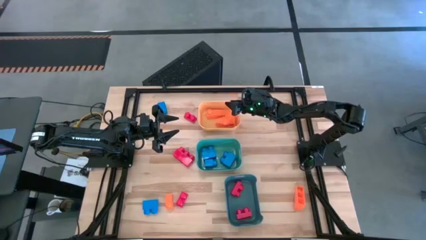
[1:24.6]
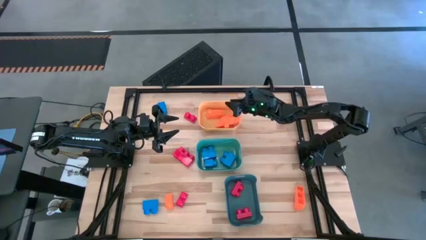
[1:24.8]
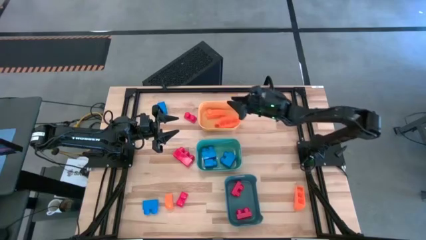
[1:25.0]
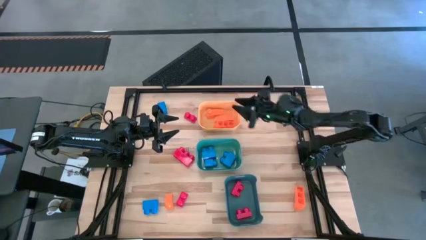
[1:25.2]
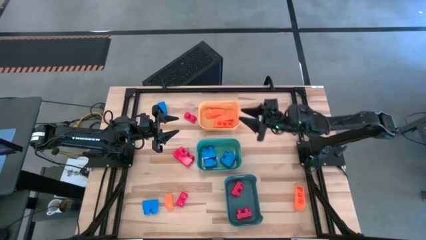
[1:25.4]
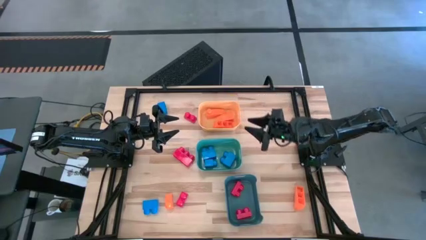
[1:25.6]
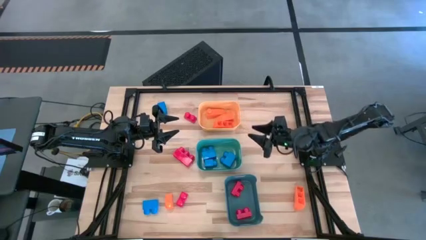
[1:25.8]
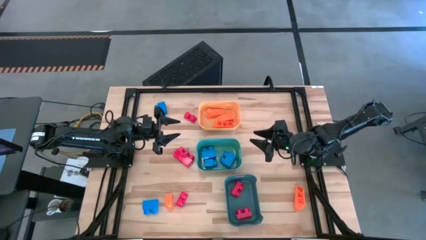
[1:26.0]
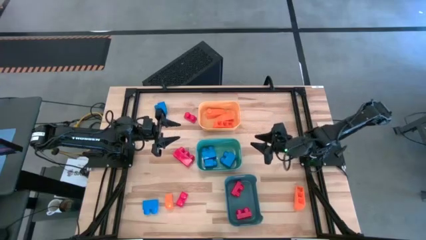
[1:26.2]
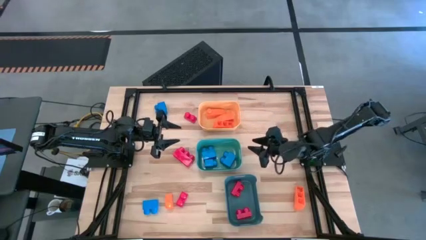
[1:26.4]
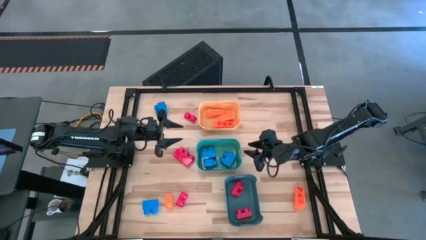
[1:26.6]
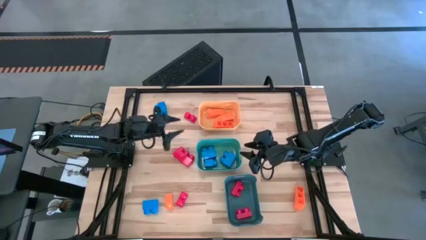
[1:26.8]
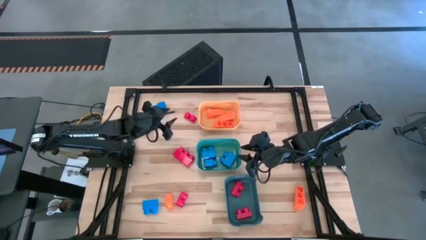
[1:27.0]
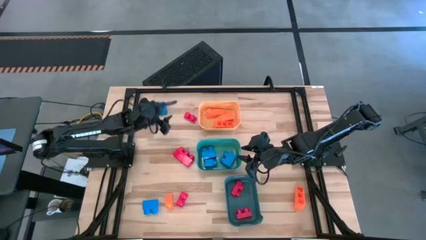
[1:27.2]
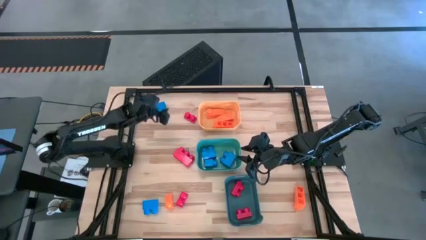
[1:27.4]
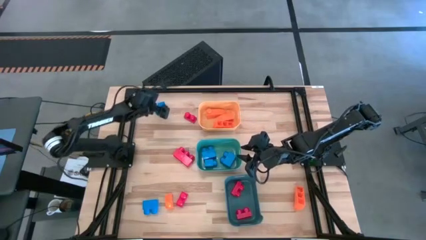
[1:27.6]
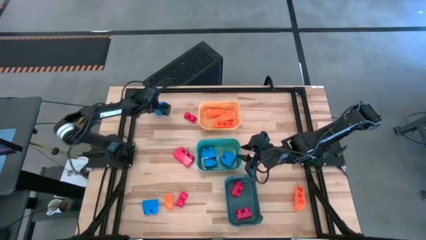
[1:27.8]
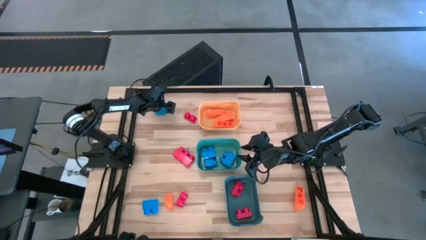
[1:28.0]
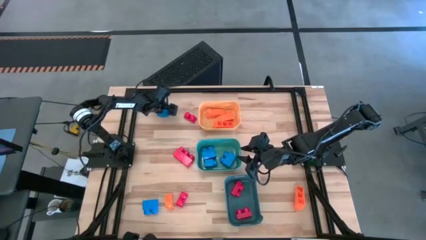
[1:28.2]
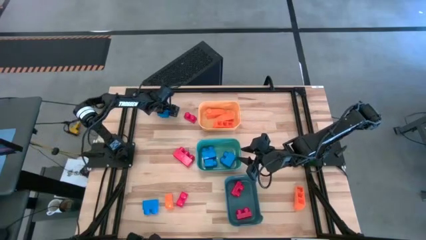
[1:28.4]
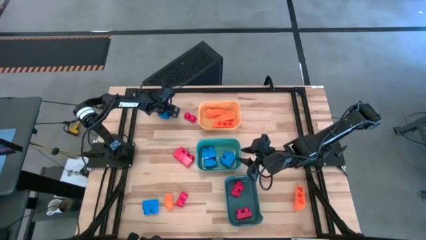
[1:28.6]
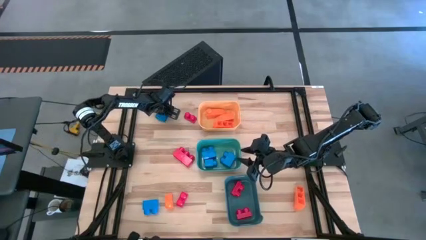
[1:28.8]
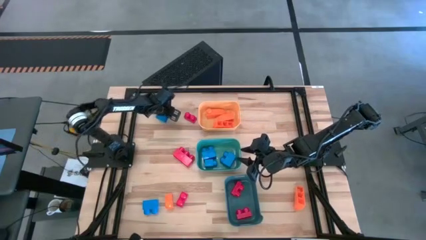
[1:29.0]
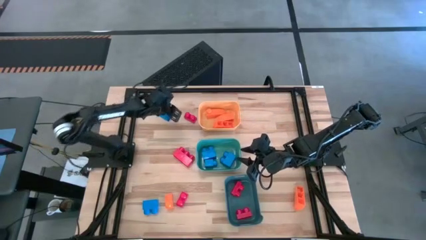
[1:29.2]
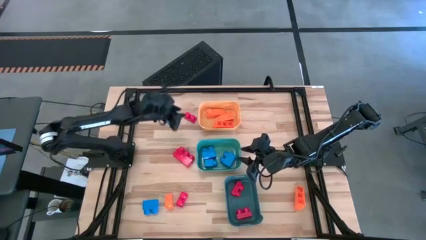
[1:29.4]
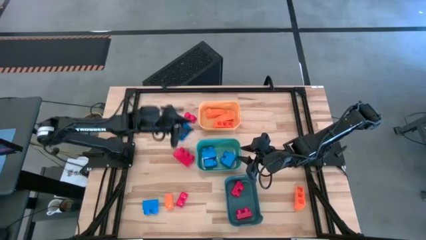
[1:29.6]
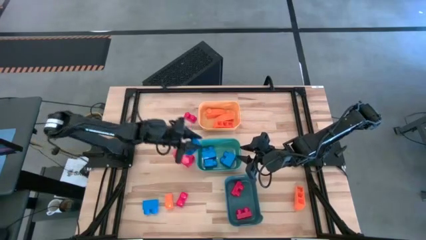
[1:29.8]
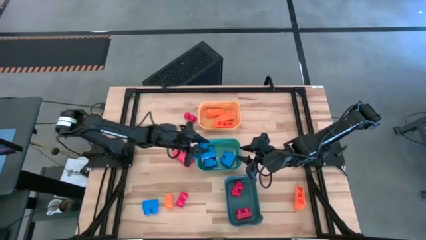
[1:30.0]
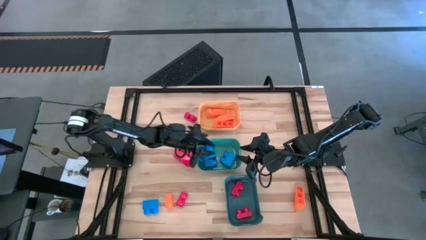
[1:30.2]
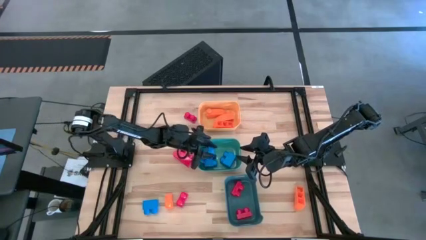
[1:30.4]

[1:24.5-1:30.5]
Task: Sort & place blocks by color
Put the blue game piece into the green bin

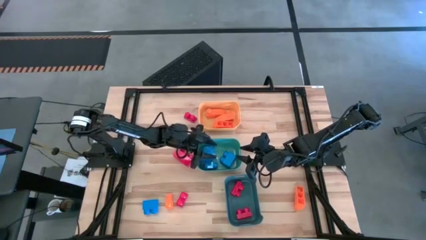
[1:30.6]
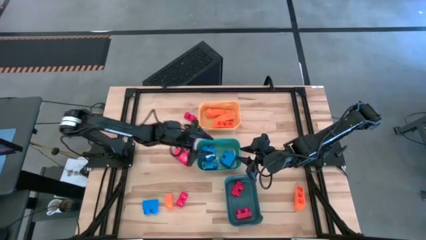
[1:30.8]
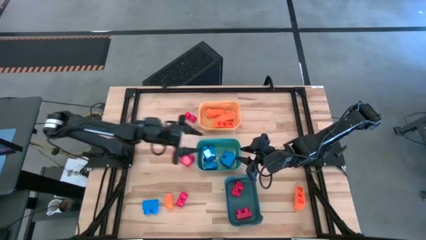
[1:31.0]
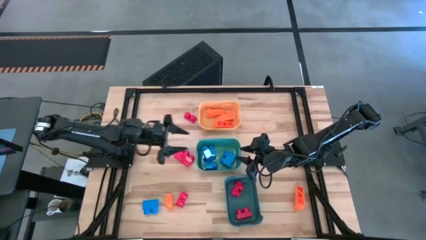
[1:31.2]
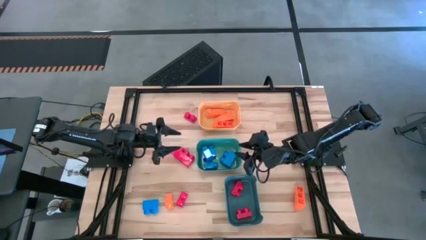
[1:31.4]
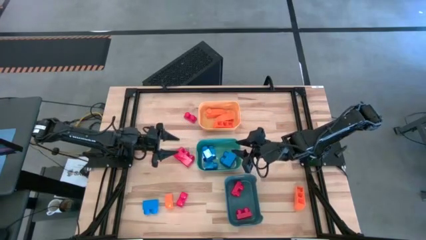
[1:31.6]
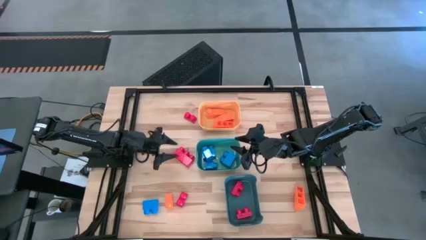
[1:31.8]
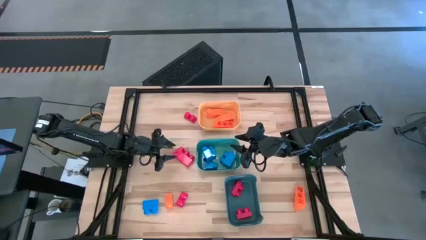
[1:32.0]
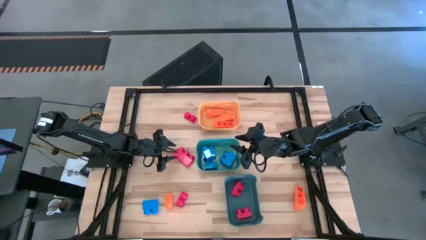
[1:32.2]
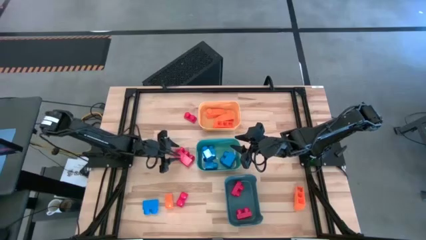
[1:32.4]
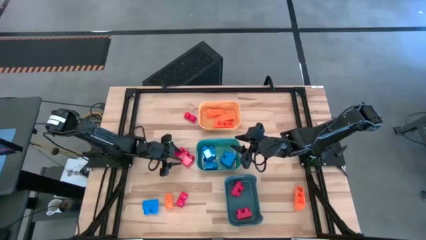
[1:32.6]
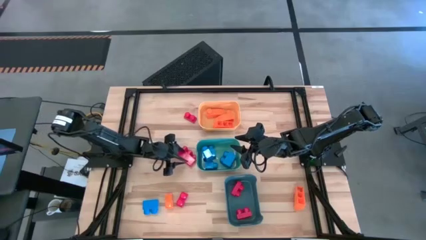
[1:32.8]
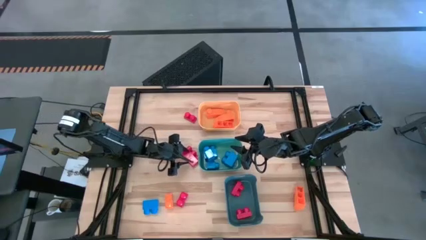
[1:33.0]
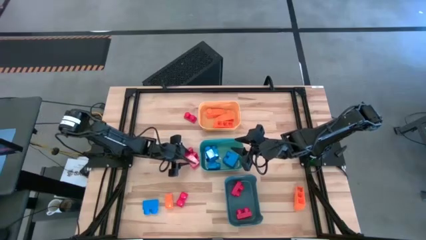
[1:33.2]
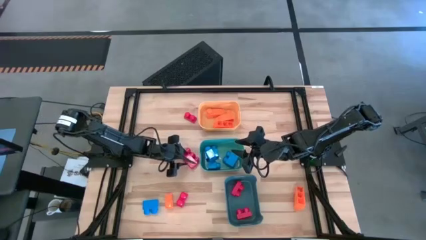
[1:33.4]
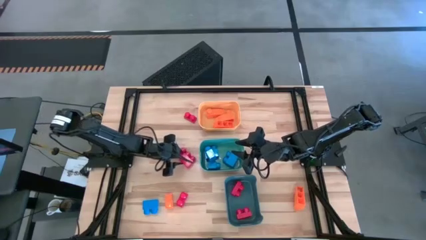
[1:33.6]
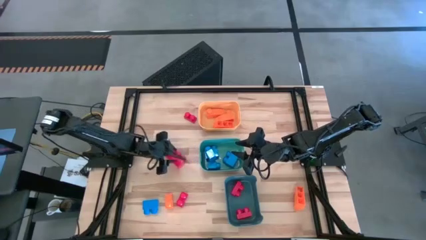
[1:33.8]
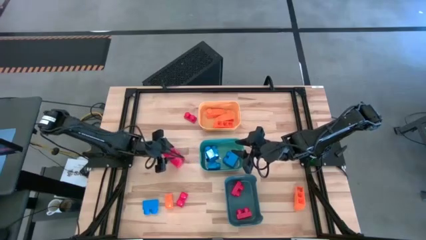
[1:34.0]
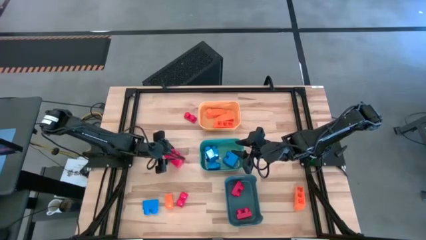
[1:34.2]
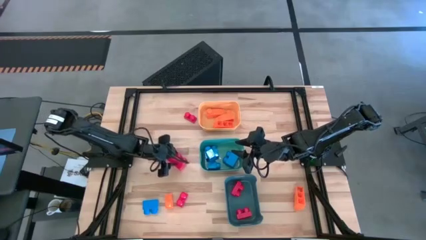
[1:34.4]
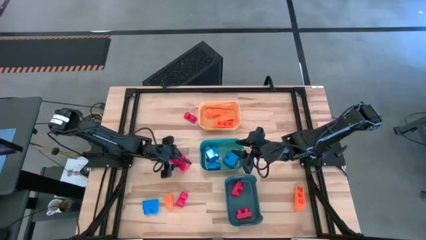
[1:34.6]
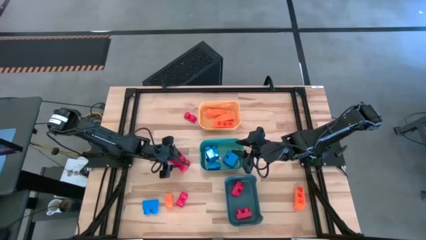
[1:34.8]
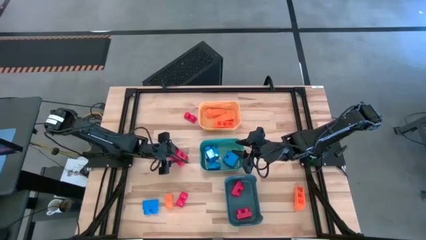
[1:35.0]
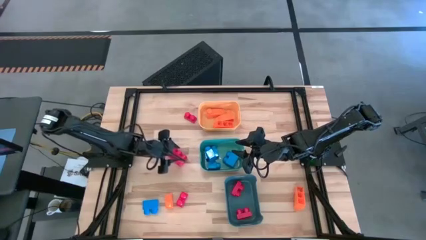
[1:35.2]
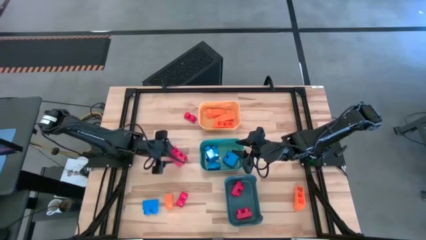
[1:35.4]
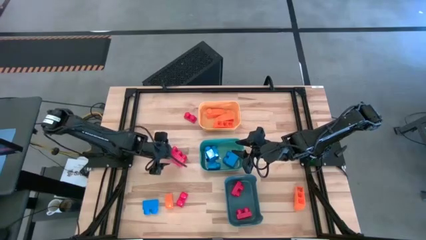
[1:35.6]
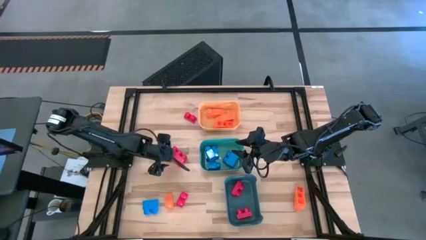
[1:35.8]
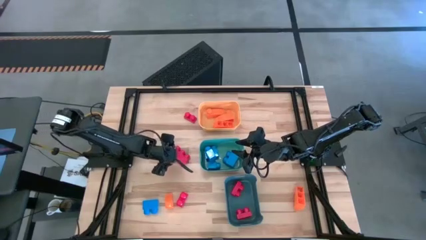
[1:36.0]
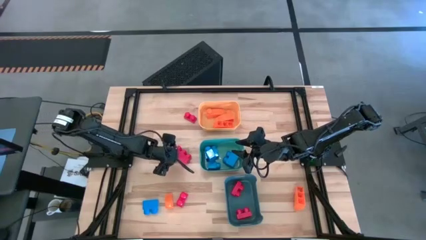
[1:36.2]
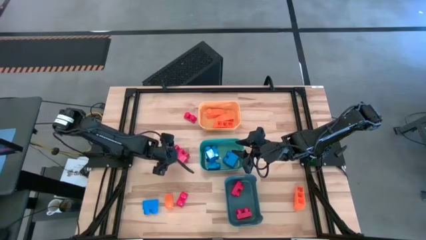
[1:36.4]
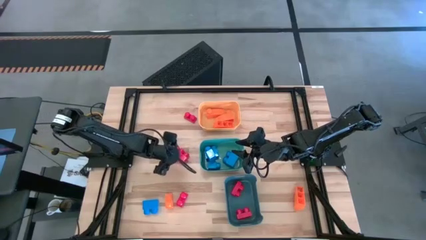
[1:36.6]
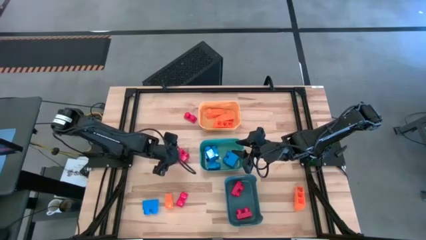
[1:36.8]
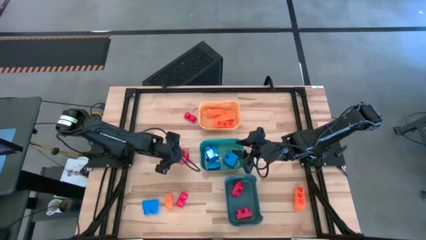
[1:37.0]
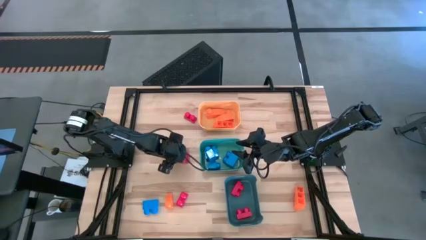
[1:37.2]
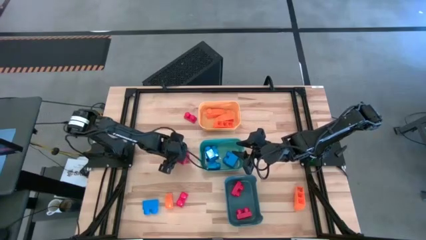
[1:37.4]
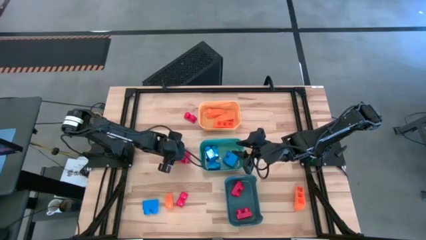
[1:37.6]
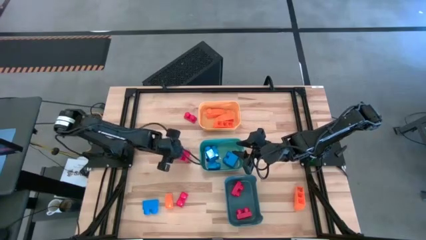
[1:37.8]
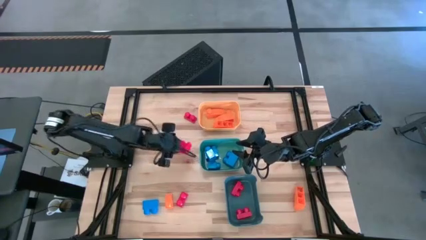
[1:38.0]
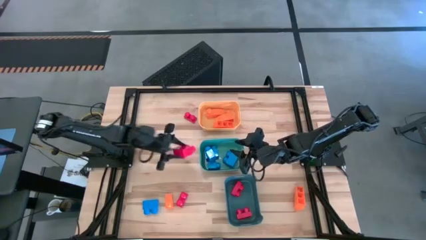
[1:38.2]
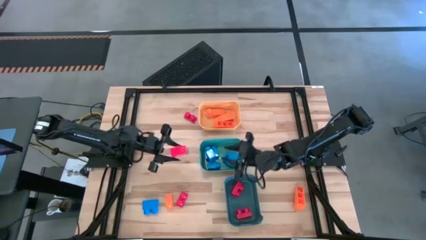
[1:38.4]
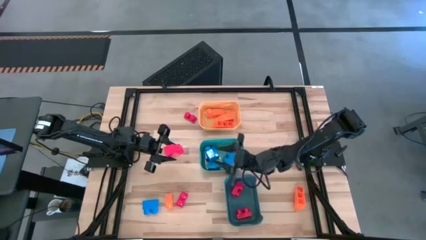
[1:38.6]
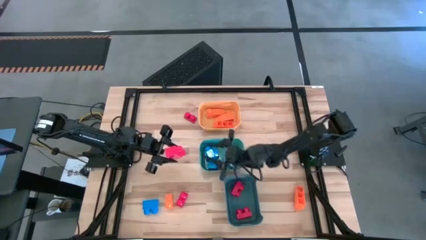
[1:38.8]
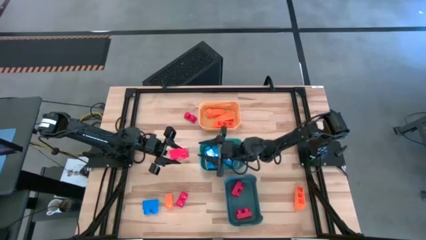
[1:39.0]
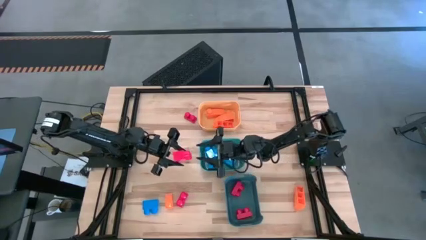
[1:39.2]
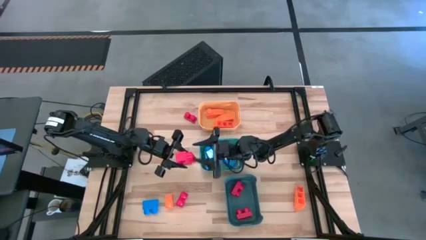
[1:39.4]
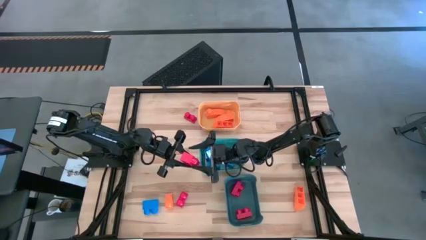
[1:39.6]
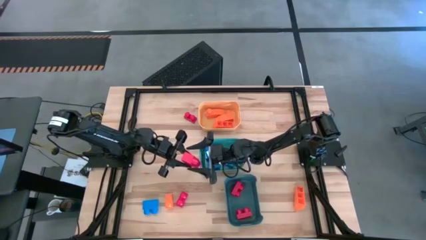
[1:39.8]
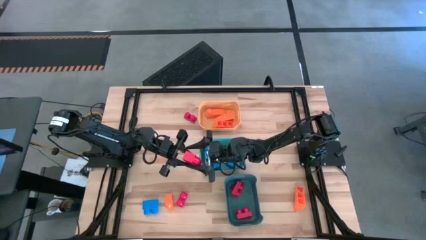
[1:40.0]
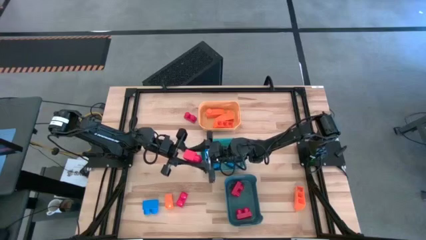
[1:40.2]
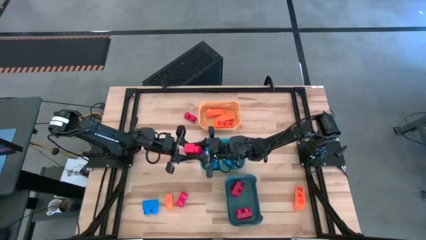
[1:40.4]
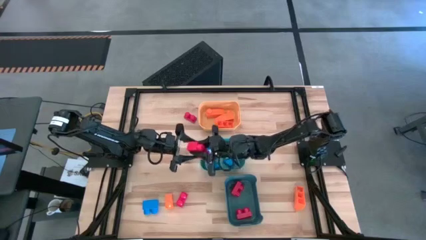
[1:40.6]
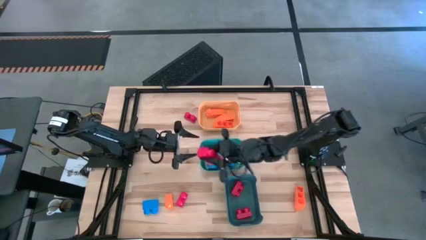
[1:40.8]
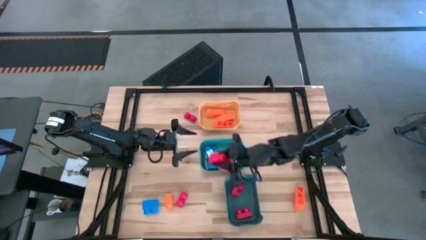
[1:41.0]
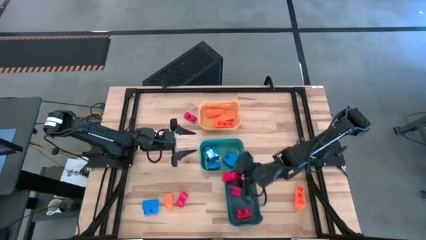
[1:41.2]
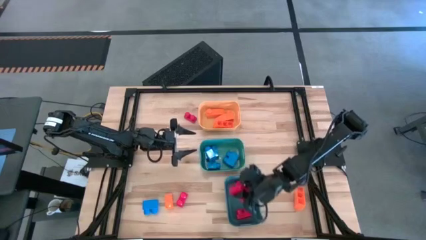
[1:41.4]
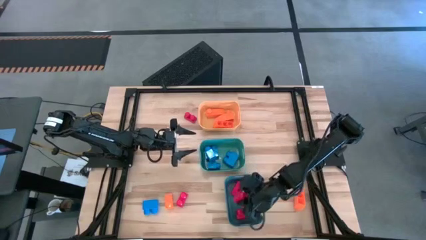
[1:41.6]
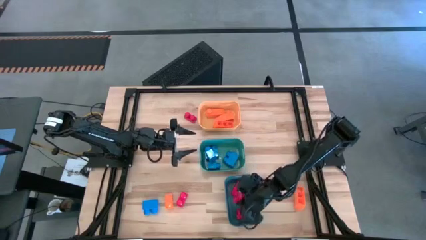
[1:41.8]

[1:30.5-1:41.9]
Put the red game piece into the blue bin
